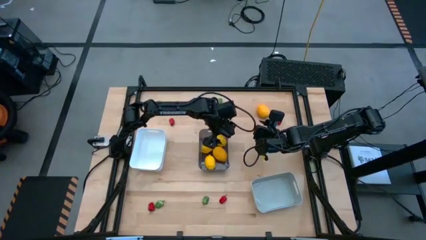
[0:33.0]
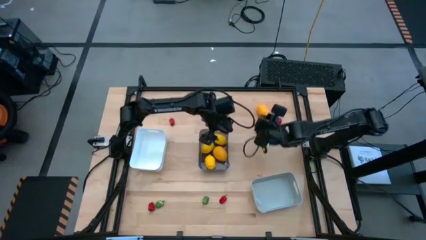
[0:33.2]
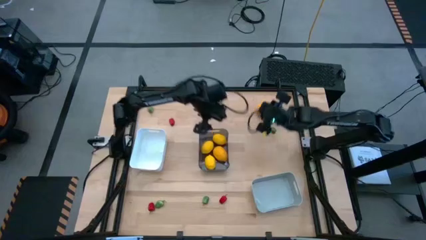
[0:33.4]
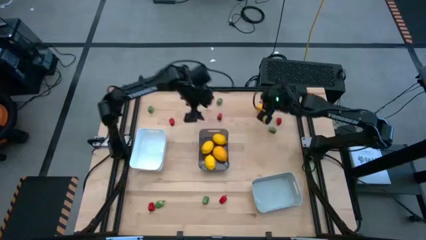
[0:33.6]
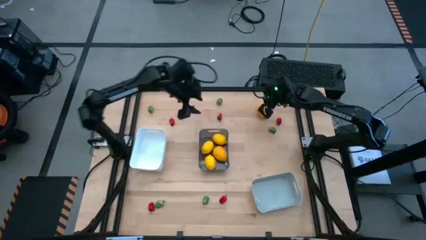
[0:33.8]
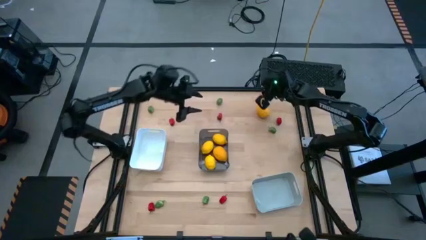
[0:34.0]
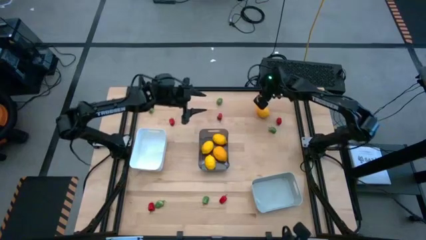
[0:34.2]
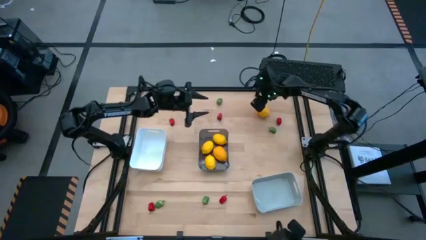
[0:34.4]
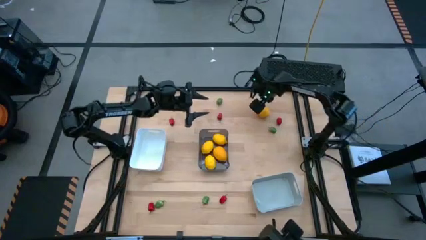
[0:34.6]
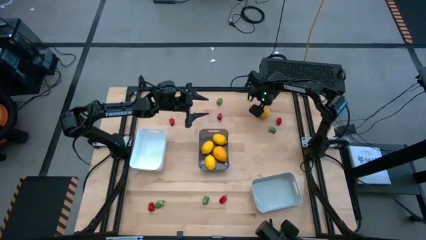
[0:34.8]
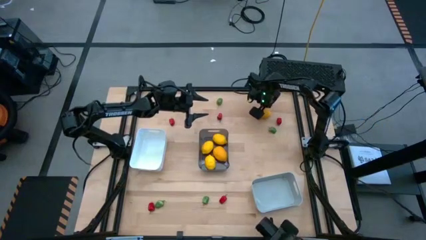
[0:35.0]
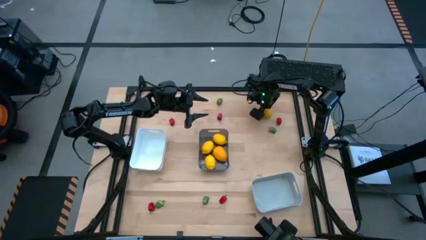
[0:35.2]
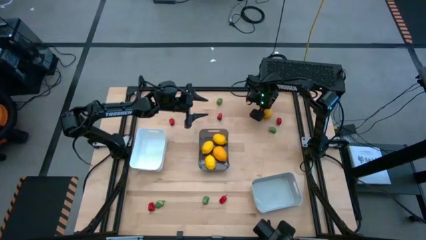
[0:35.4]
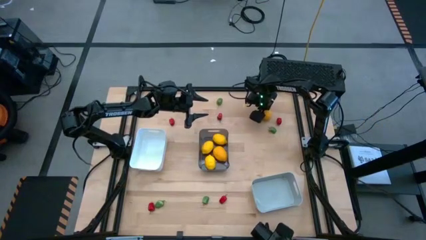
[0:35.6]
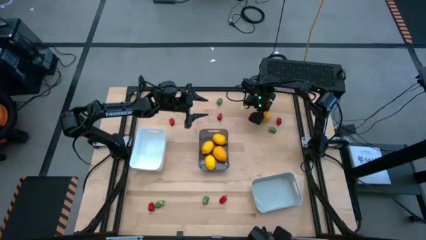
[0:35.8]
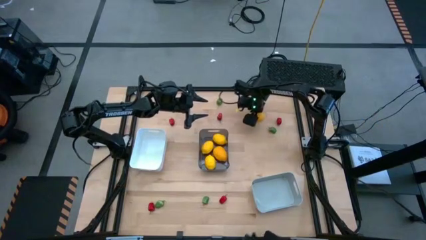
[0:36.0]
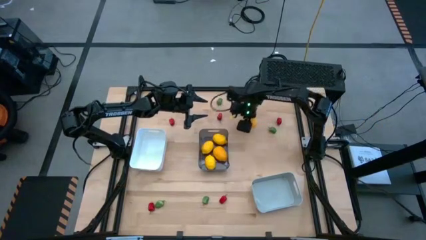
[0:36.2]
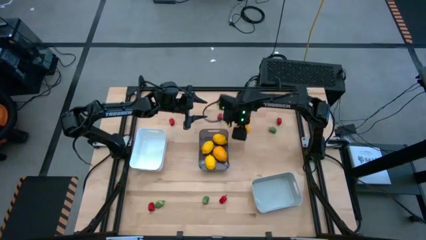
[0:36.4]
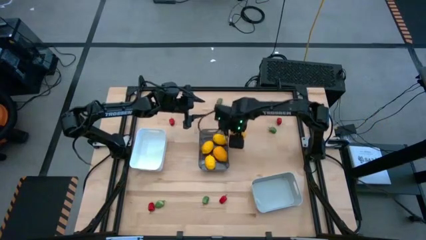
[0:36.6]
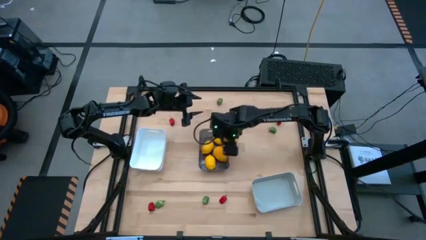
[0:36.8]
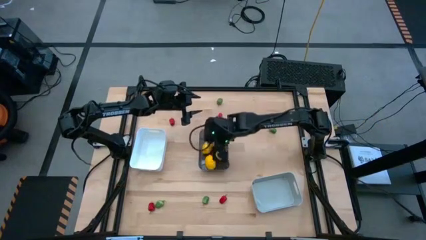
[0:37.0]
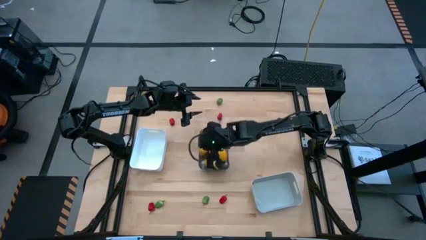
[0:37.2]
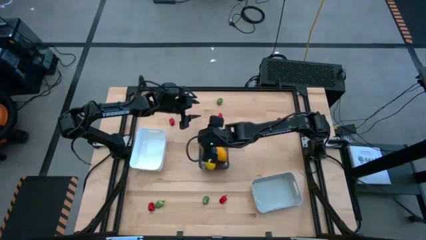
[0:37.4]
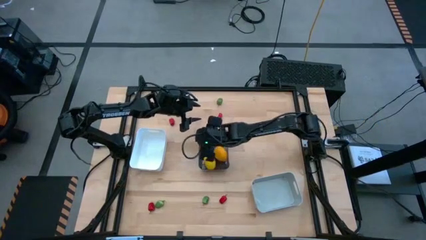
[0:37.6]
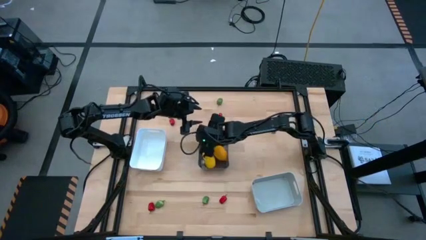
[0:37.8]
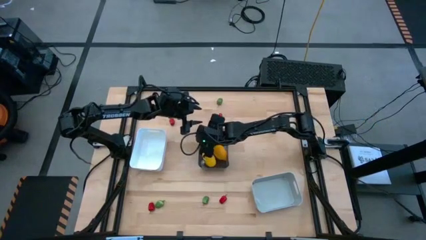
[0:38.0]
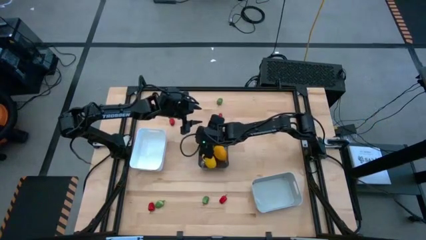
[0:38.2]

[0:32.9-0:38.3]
Task: Sort produce into baskets
Put the lemon into the black bin

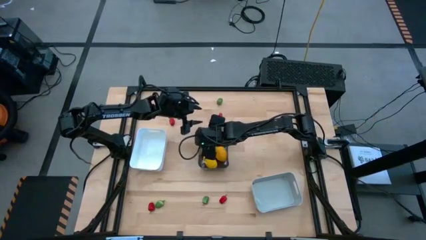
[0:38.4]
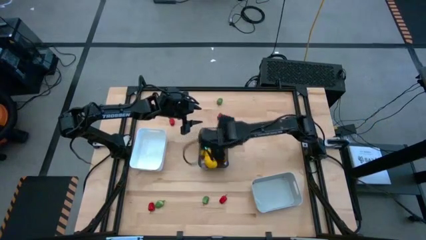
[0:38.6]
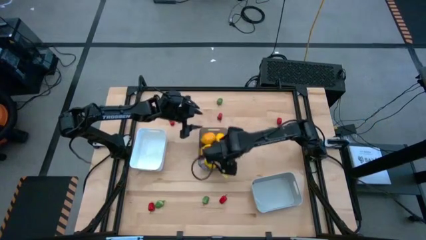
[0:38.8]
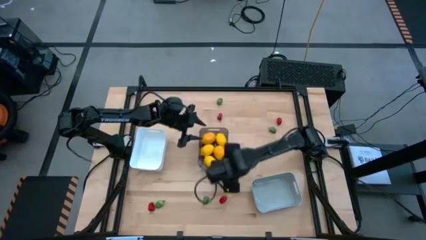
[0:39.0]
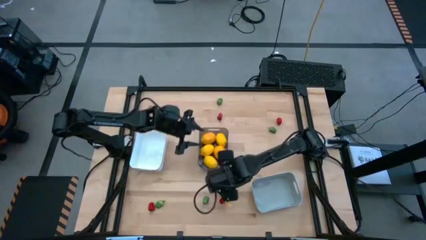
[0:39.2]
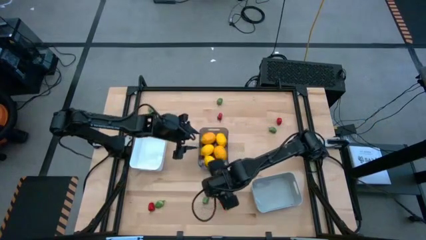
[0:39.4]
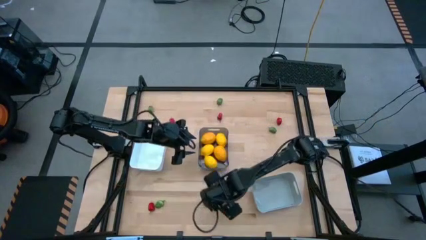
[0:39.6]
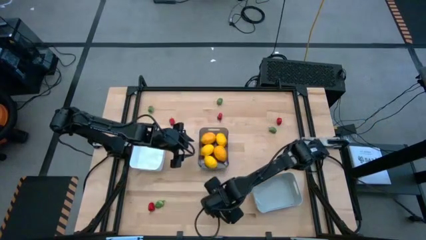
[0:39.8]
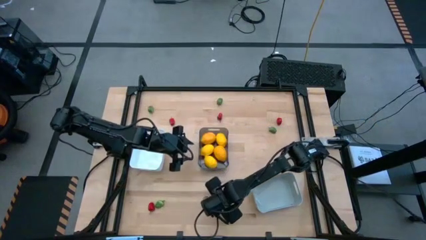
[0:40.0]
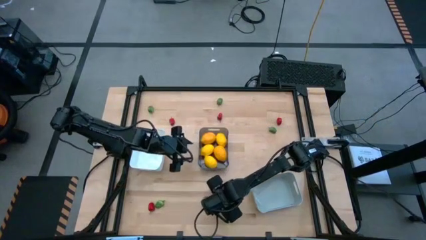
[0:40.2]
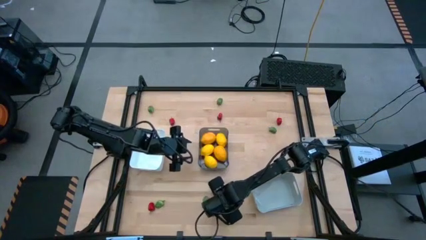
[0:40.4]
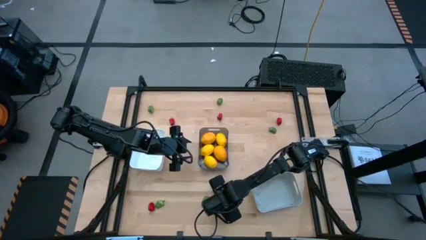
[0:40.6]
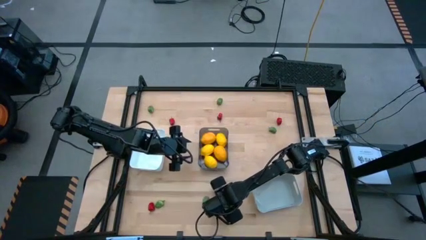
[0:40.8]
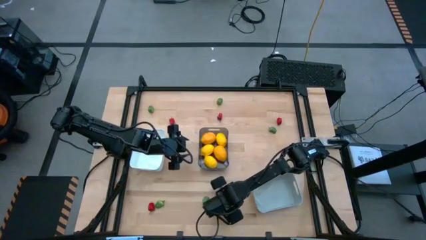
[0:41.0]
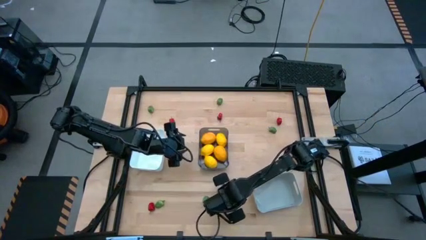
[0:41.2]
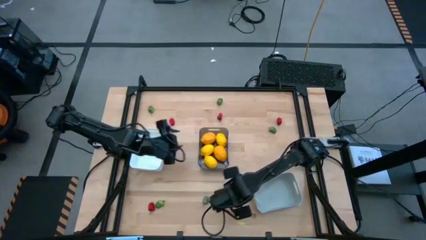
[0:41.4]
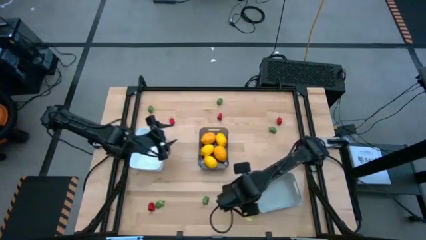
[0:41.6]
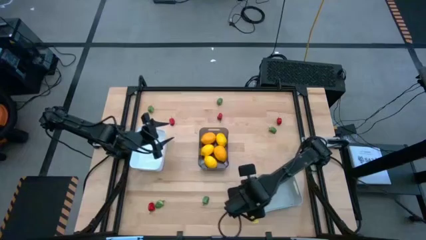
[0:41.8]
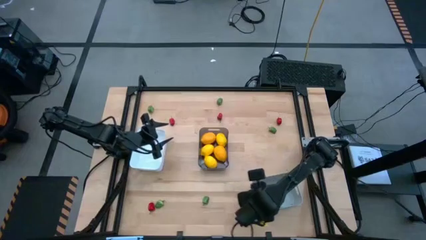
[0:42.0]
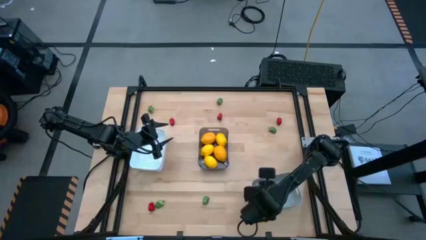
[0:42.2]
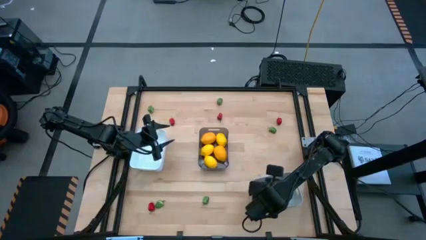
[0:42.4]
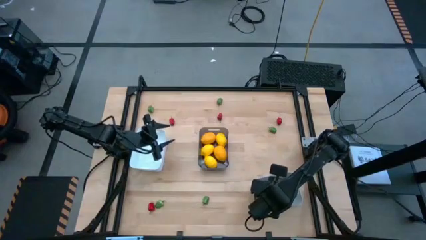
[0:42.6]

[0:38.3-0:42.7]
Put the red chili pepper into the gray bin

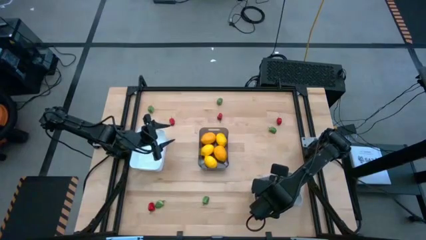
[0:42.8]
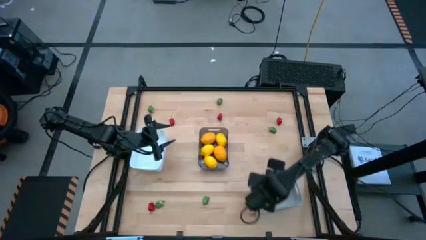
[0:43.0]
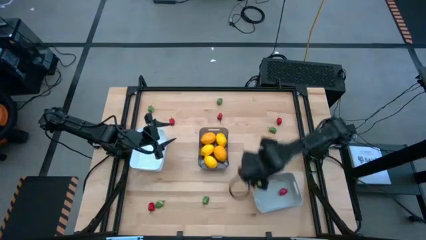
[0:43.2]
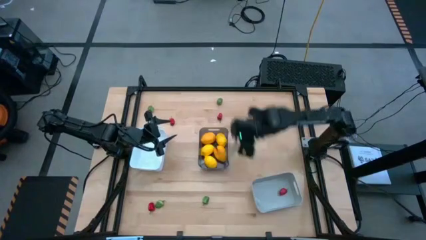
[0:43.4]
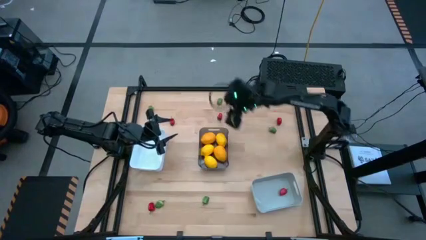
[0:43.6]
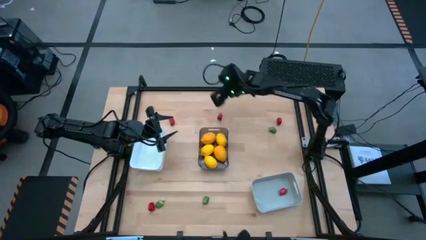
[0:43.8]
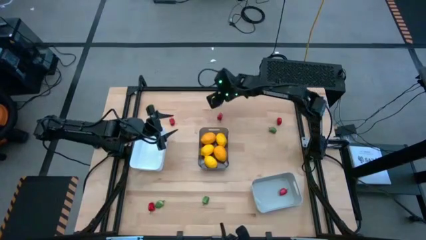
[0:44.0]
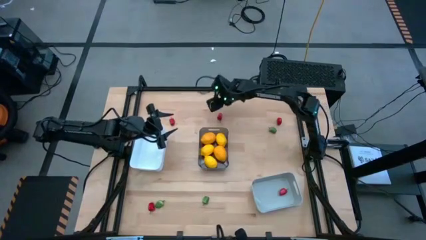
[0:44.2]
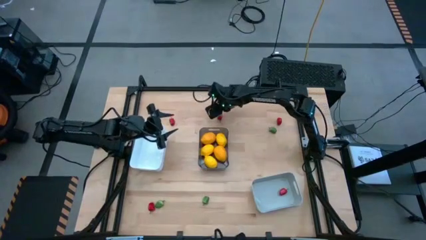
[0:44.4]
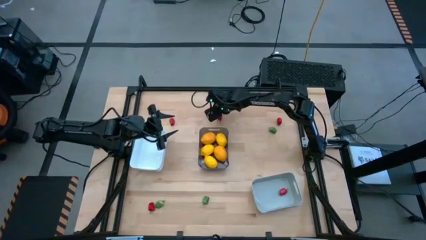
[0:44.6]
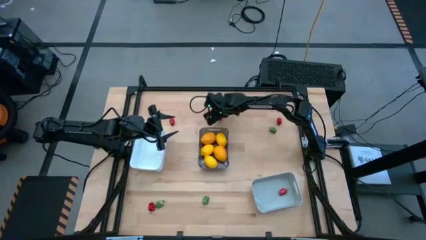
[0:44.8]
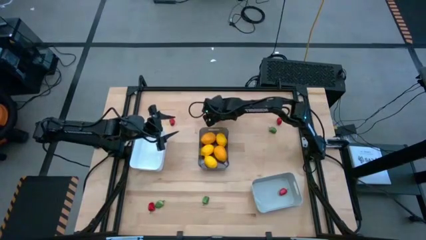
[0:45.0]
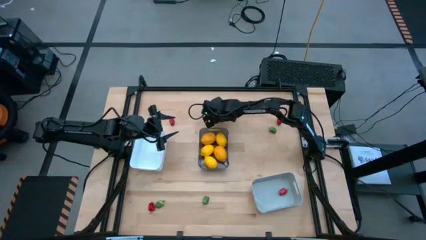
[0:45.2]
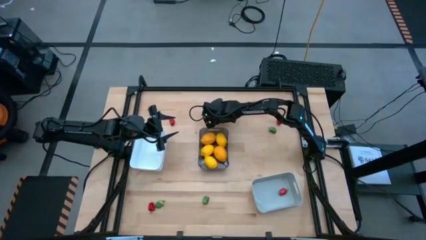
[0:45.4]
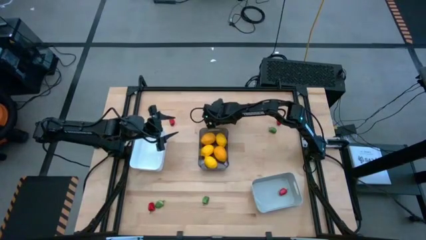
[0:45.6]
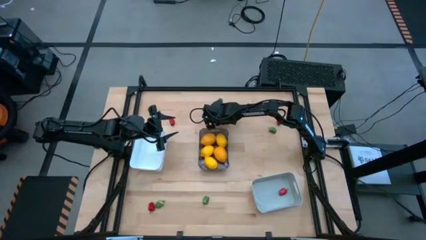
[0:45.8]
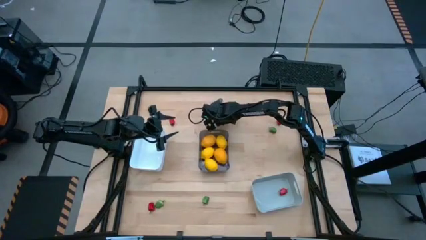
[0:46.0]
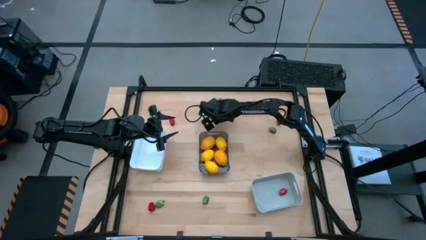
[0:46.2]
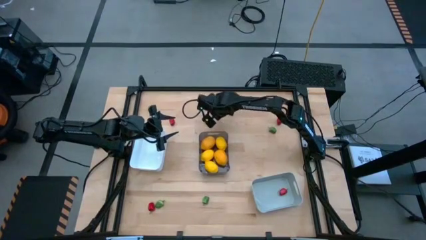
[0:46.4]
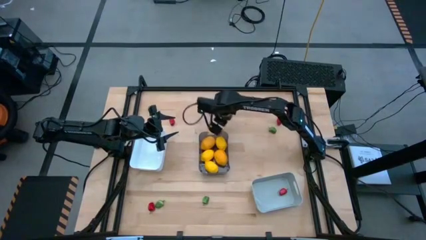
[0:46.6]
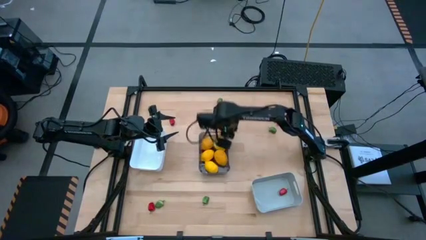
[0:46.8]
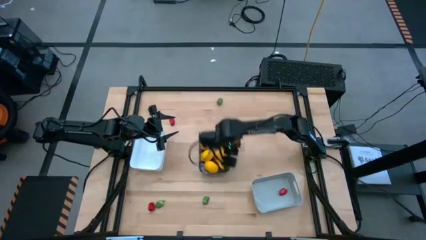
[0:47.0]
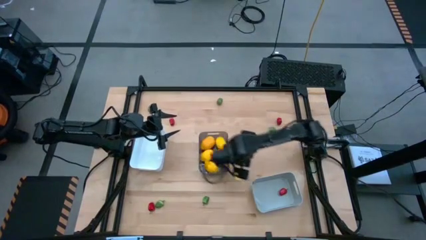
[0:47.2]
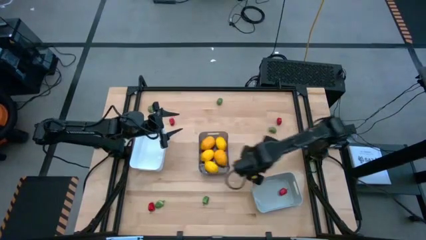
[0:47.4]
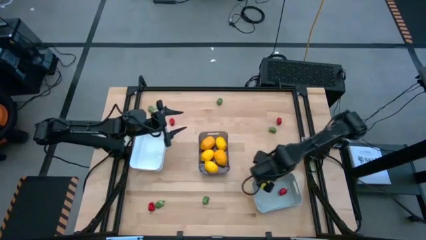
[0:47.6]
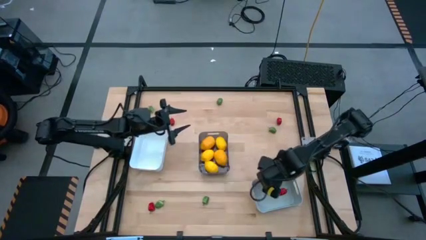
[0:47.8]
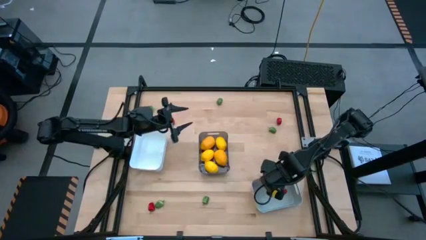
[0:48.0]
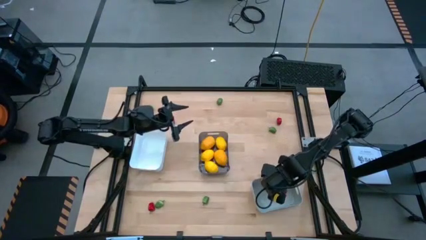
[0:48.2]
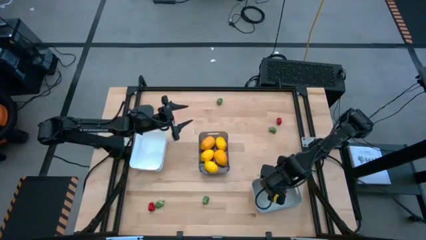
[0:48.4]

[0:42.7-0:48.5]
Put the red chili pepper into the gray bin
